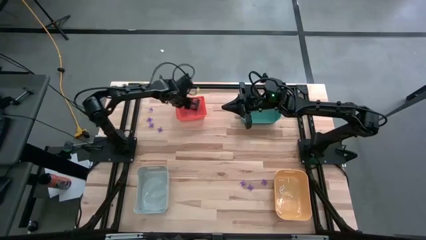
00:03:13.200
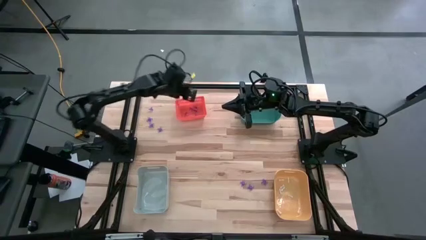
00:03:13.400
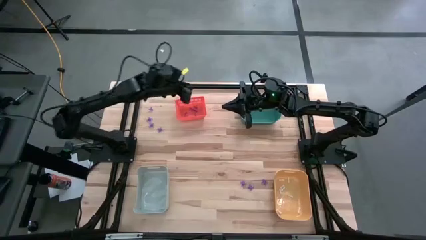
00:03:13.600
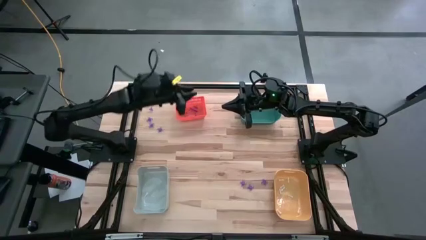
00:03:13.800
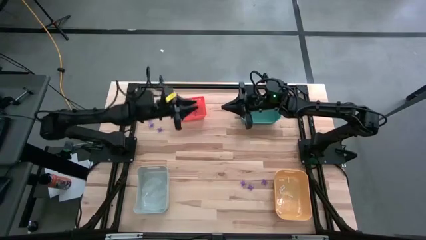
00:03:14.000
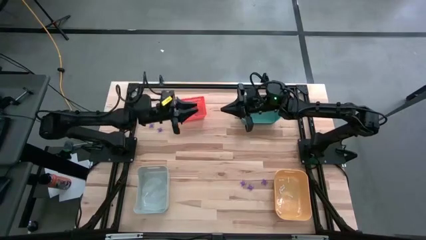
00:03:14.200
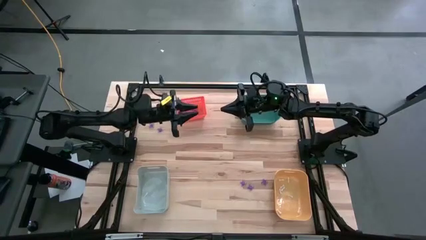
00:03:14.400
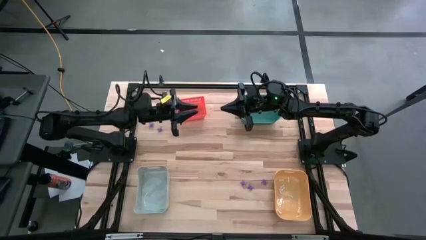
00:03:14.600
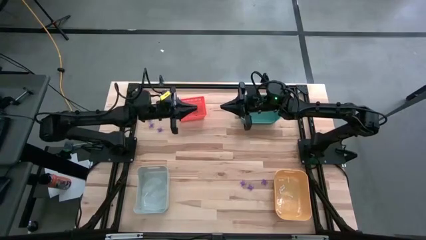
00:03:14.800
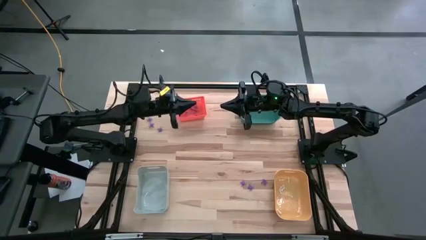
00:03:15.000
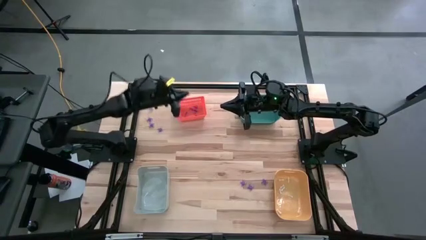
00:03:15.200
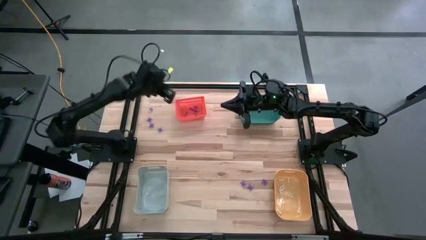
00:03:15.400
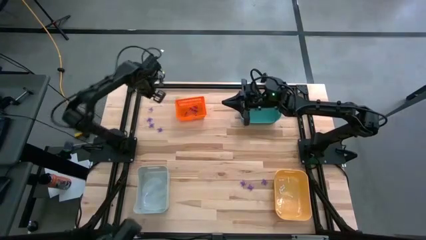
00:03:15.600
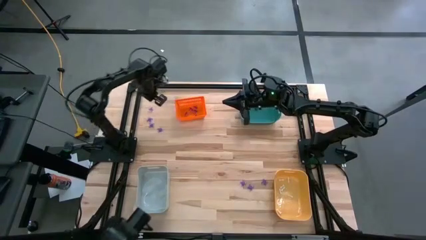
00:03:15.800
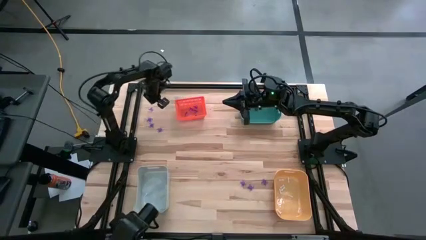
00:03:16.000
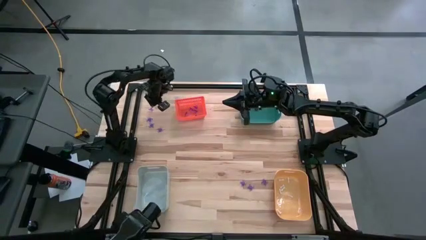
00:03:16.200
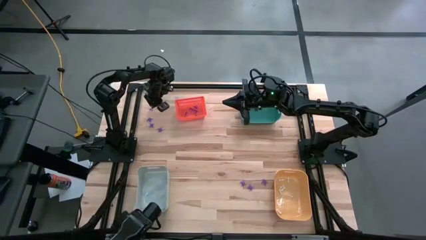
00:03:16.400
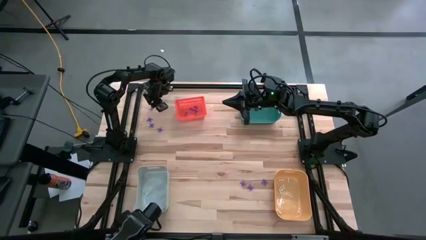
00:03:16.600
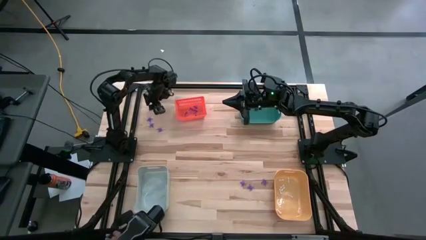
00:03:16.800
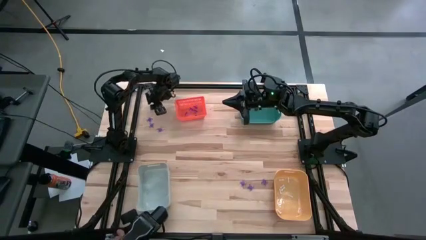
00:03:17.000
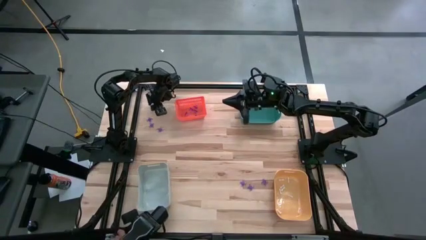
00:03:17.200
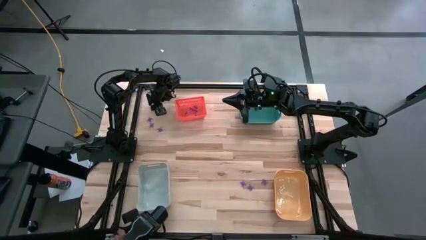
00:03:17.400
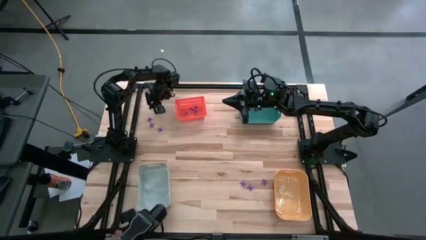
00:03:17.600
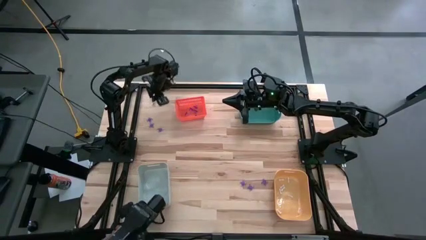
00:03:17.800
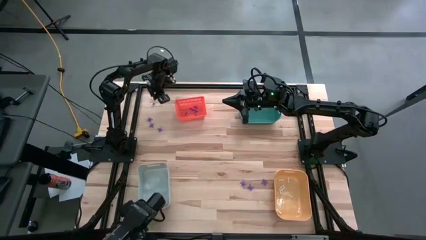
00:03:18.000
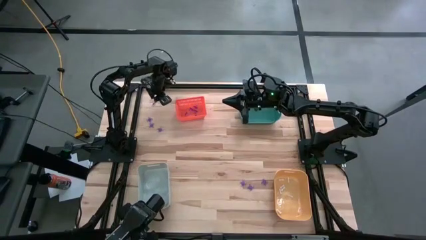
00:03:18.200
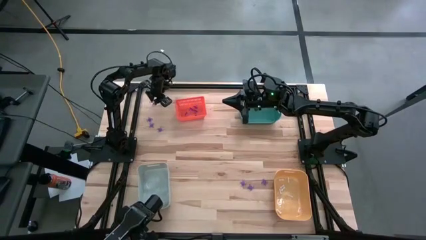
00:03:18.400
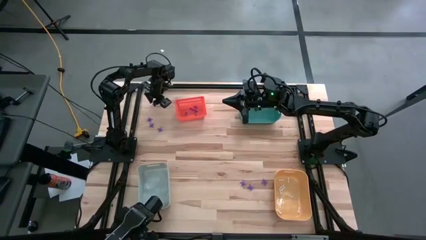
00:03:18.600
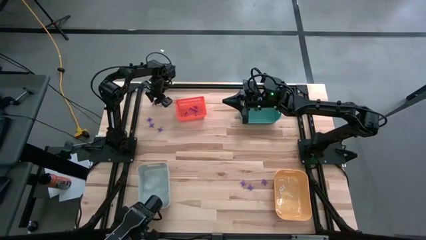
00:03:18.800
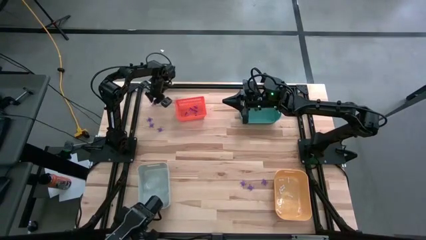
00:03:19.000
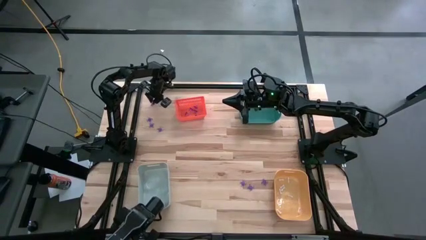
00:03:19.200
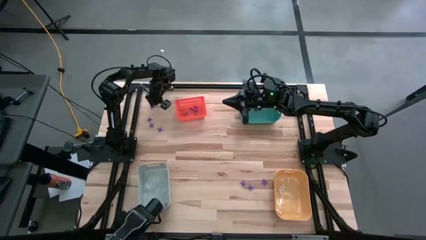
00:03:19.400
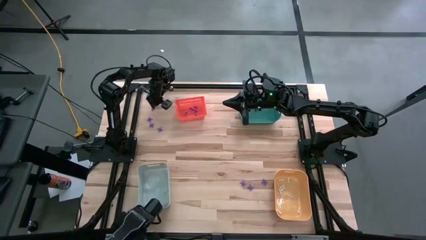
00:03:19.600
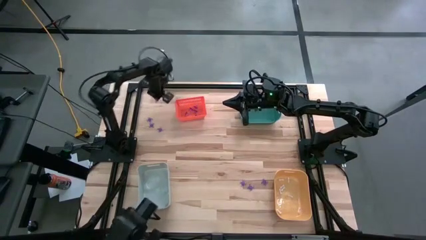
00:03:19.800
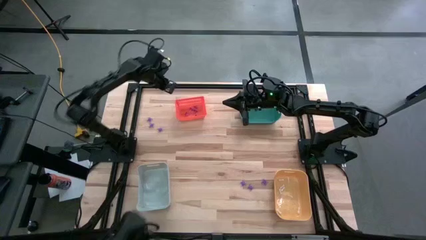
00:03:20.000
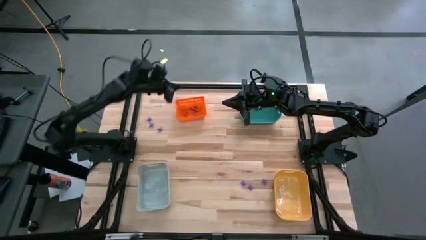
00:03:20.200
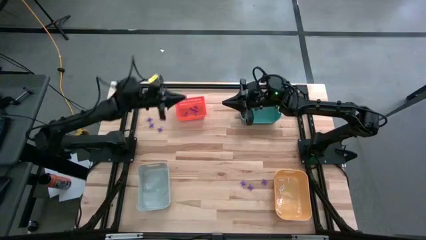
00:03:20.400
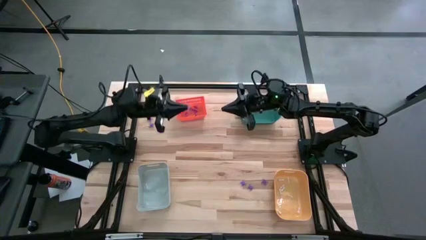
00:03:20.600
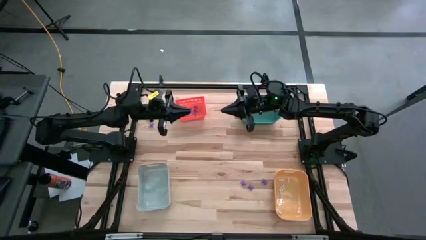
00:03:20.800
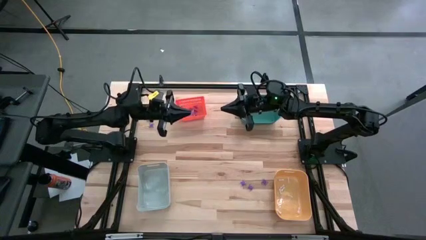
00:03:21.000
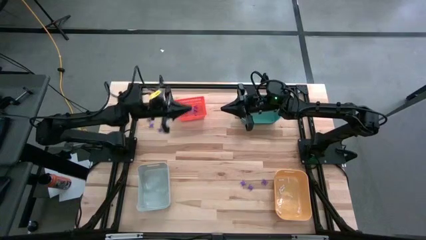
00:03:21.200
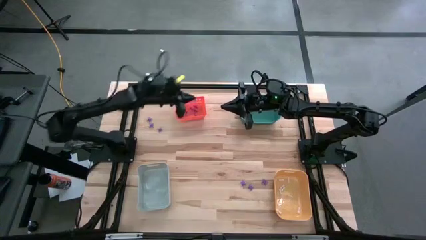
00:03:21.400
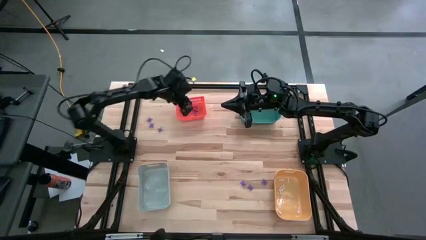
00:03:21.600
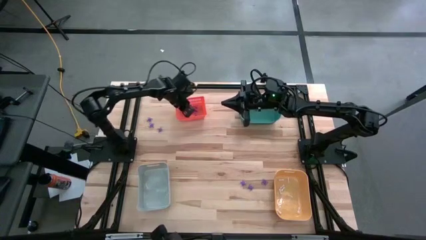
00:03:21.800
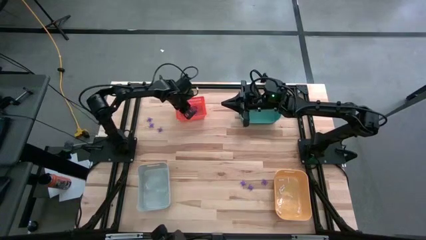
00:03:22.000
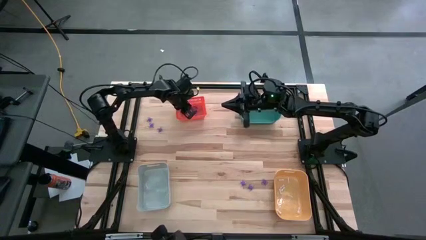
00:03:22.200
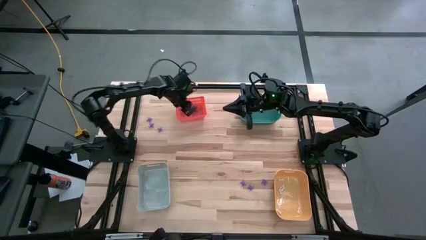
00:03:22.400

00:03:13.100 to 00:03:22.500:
Task: Sort Halloween decoration
Put the purple witch hat toy into the orange bin

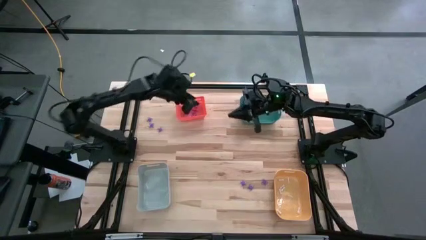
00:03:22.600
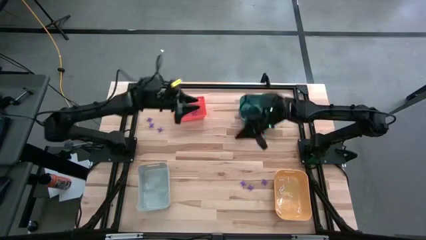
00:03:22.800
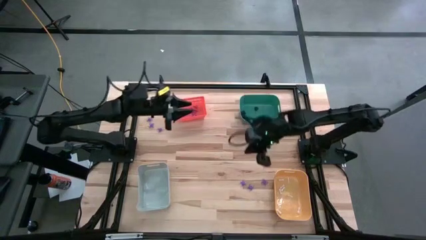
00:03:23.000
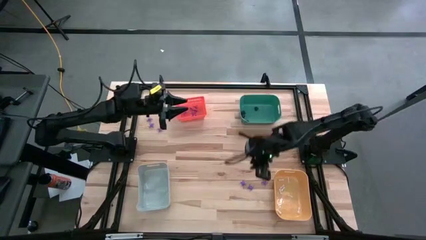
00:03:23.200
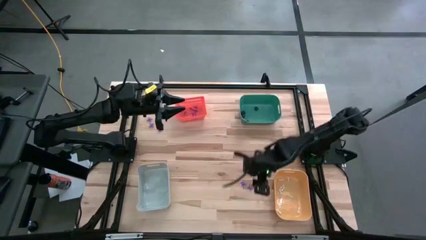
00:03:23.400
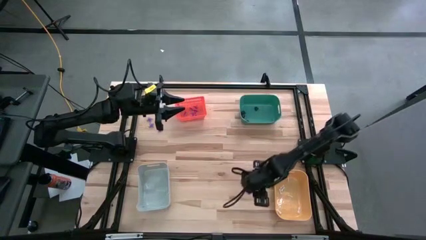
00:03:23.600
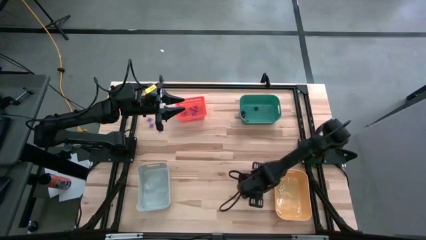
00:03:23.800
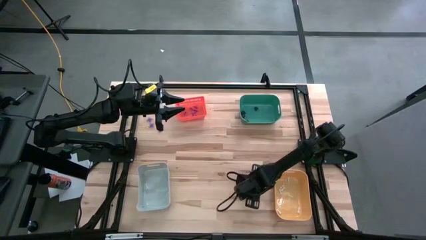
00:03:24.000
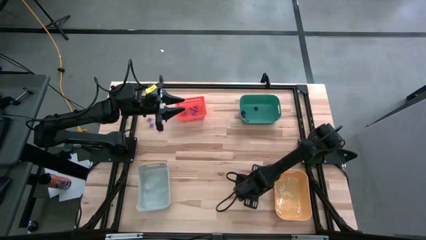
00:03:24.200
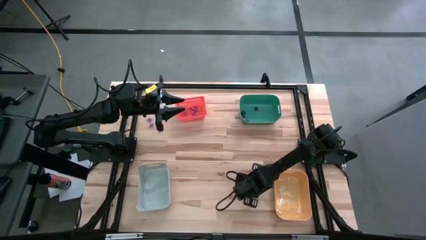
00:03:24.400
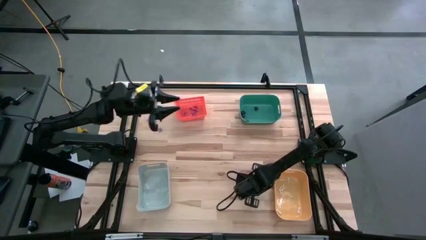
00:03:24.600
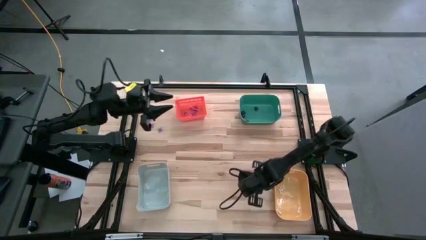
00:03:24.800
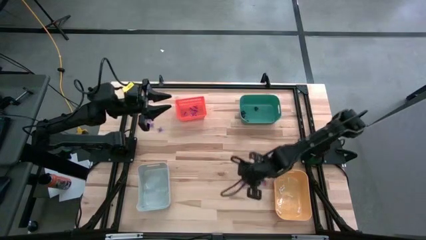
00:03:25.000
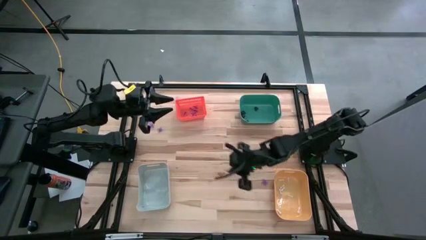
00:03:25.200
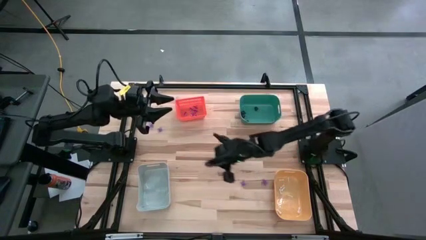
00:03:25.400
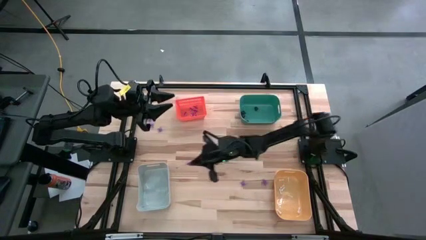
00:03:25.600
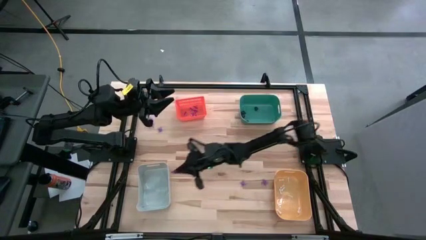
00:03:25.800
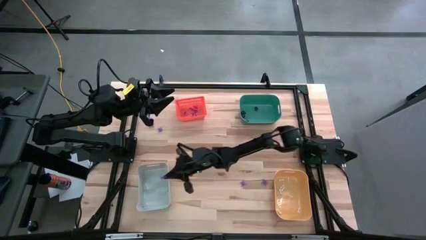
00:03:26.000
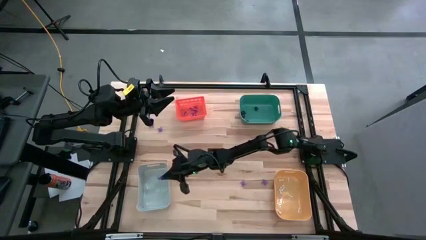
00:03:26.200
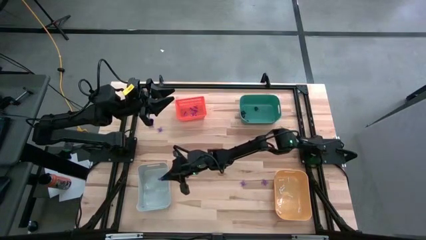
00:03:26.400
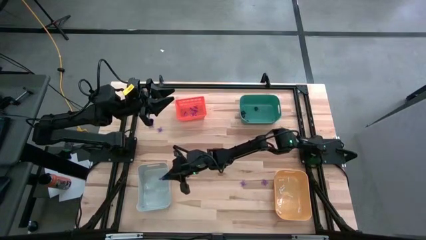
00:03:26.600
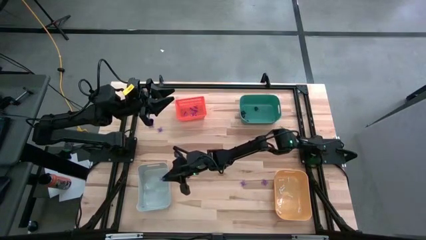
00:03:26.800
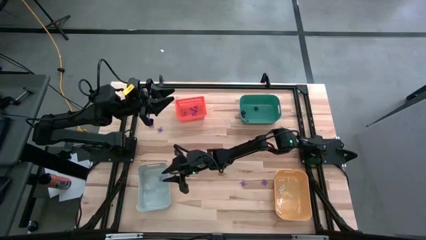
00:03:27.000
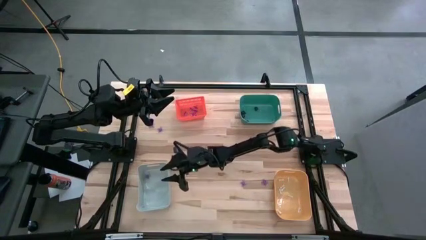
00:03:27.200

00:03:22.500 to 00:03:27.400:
Put the purple spider toy into the white bin

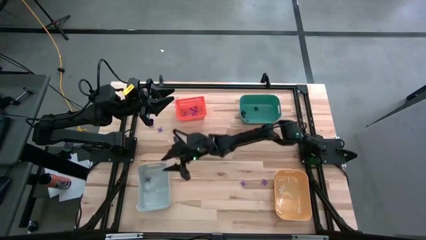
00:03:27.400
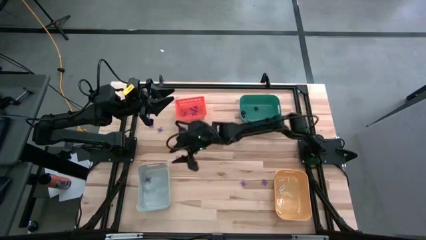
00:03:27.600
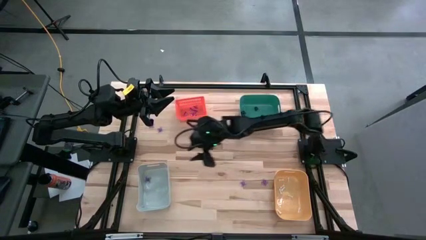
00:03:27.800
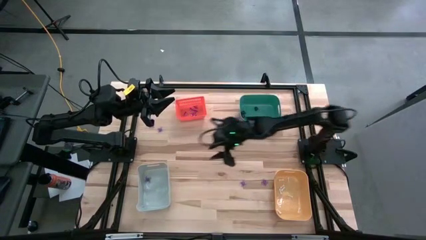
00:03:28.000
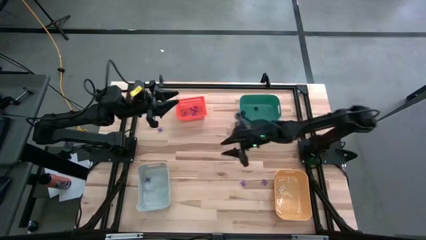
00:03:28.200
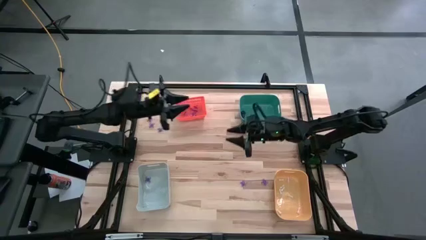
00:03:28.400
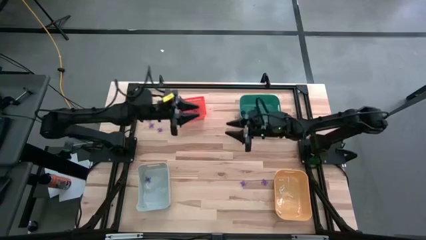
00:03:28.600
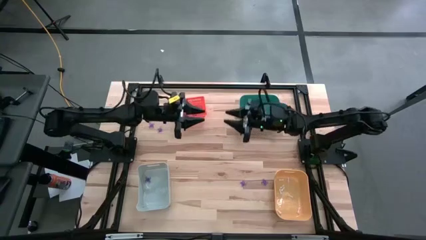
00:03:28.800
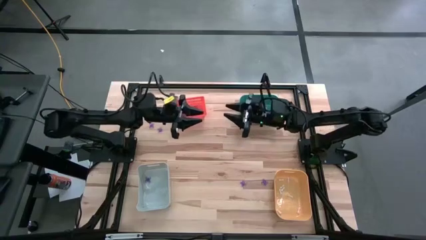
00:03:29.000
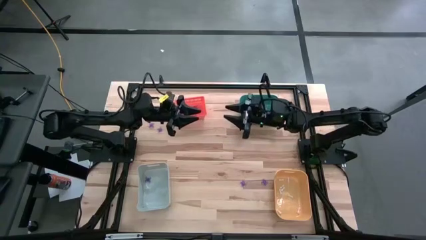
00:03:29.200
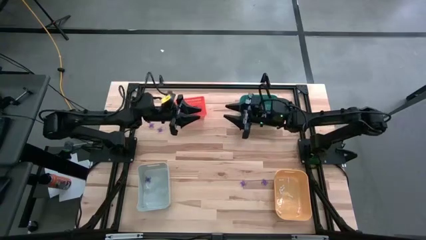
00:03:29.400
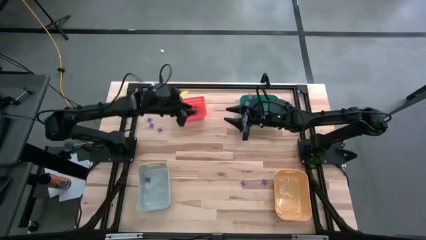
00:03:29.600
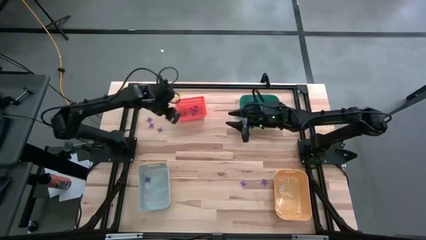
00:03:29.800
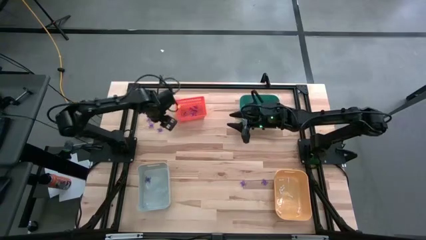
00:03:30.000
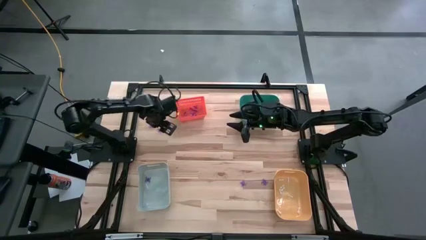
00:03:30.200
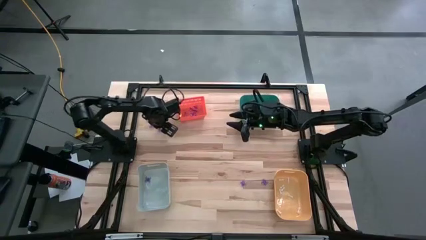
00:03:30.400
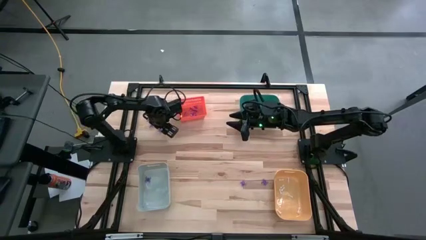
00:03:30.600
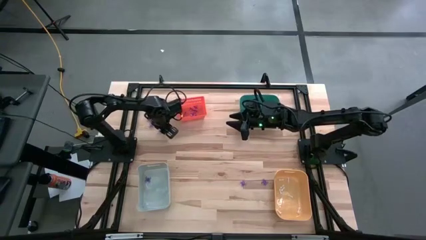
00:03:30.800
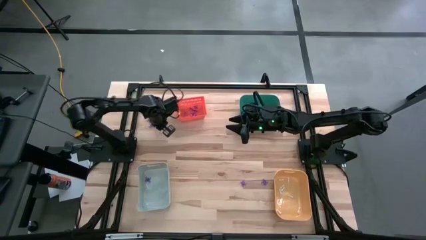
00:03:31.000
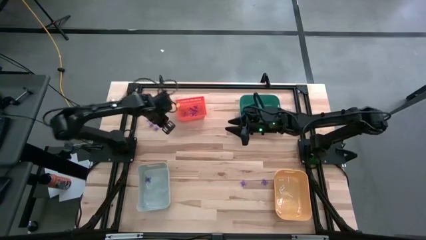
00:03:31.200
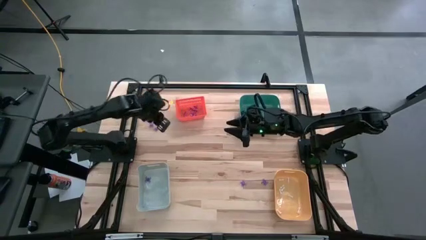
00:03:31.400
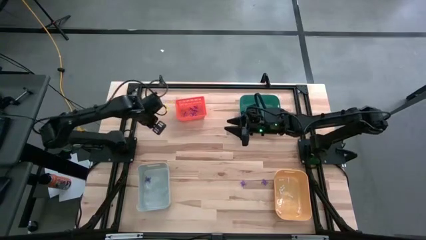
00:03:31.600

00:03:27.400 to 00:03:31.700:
Put the purple spider toy into the white bin
